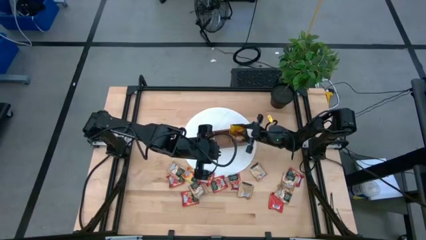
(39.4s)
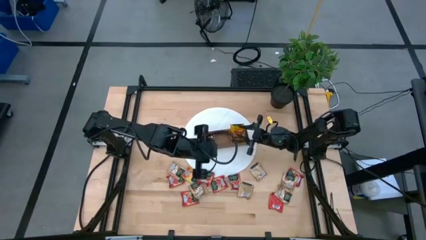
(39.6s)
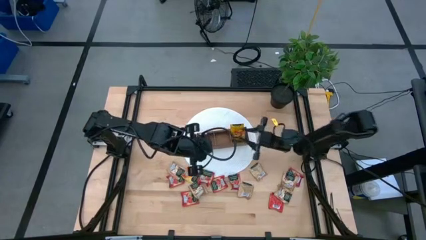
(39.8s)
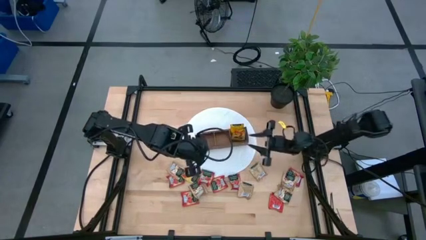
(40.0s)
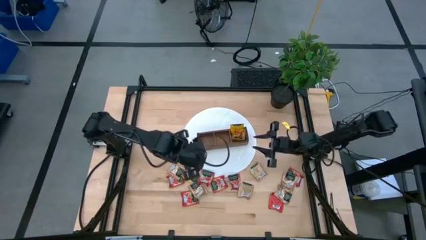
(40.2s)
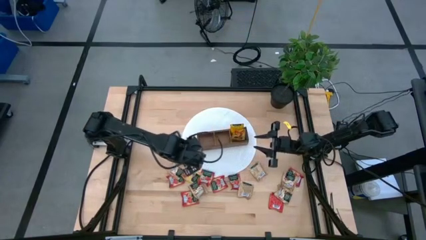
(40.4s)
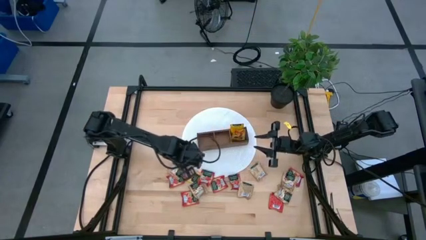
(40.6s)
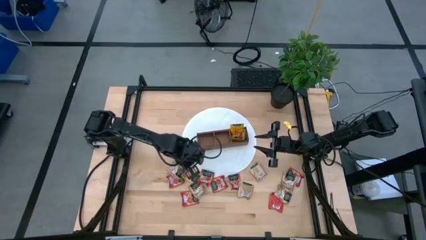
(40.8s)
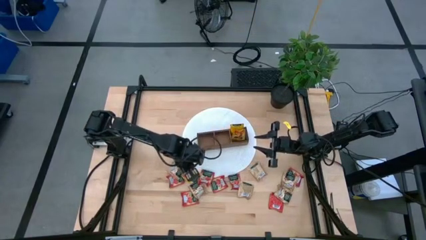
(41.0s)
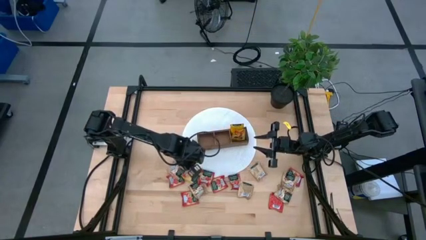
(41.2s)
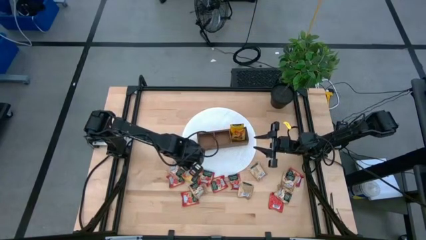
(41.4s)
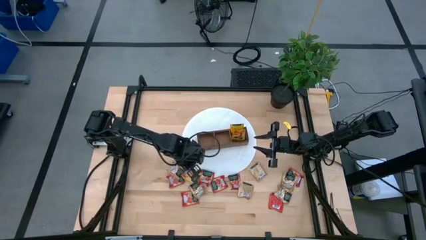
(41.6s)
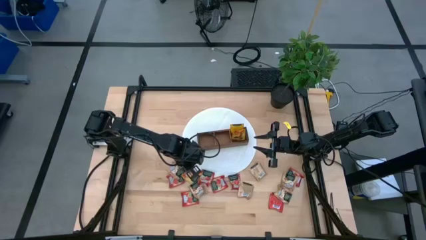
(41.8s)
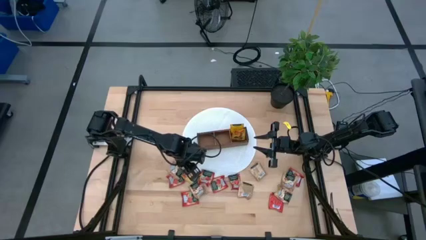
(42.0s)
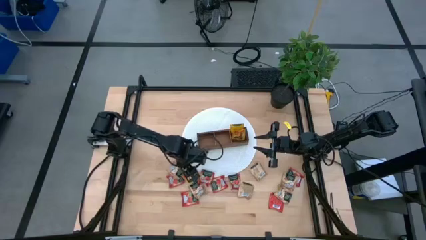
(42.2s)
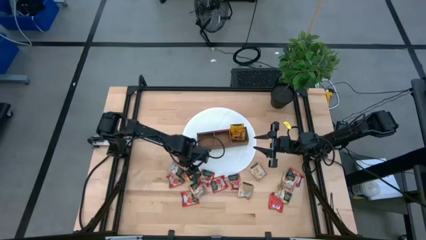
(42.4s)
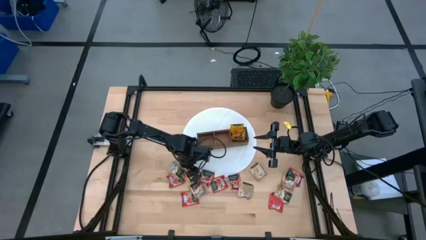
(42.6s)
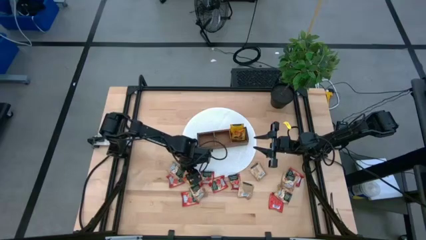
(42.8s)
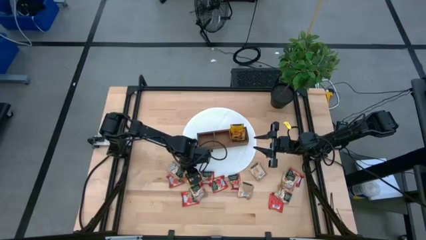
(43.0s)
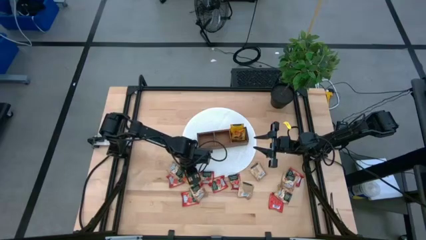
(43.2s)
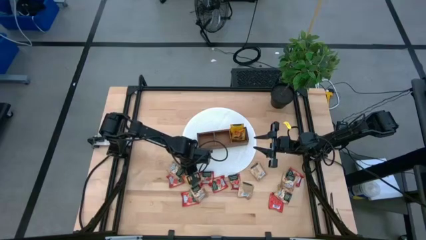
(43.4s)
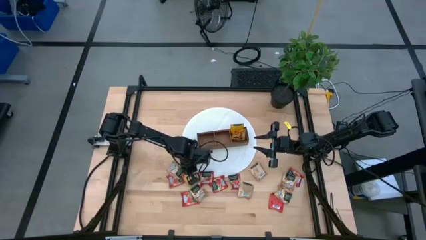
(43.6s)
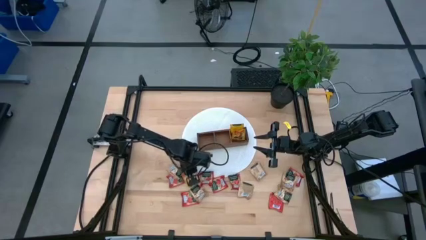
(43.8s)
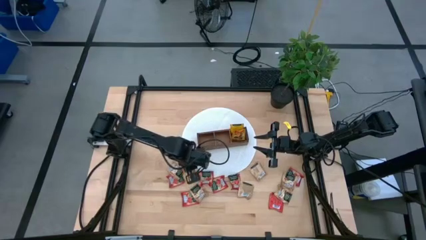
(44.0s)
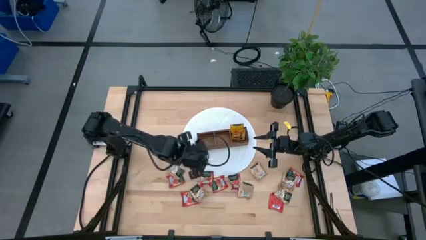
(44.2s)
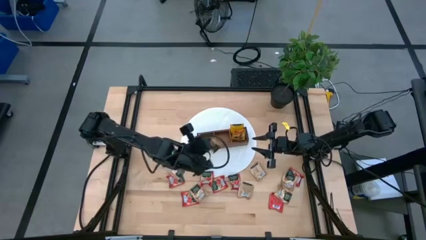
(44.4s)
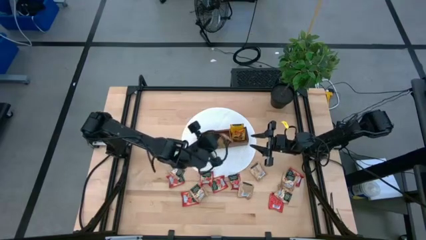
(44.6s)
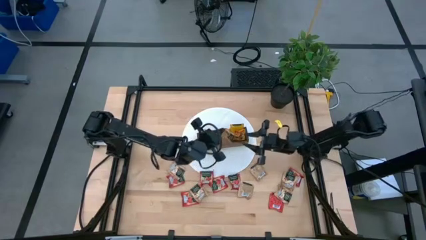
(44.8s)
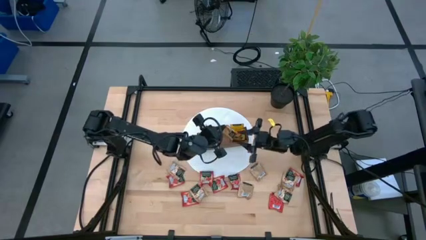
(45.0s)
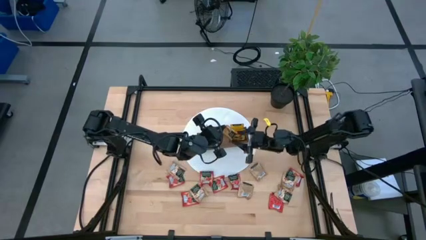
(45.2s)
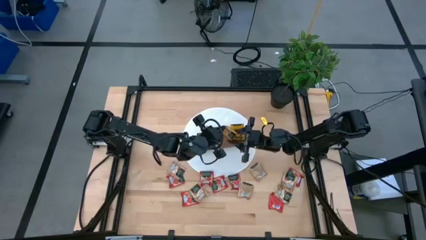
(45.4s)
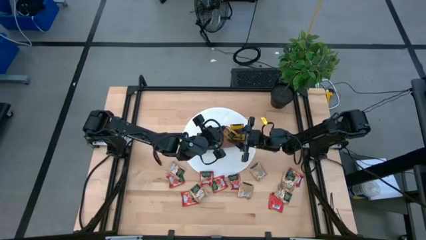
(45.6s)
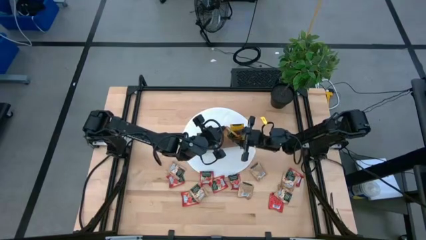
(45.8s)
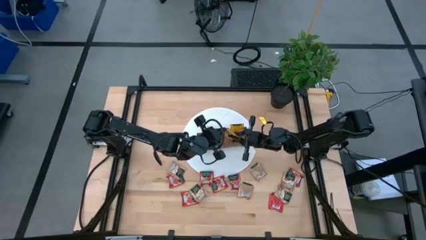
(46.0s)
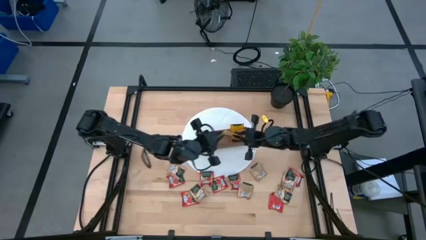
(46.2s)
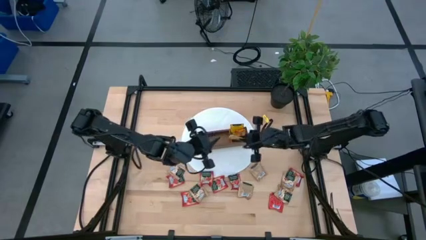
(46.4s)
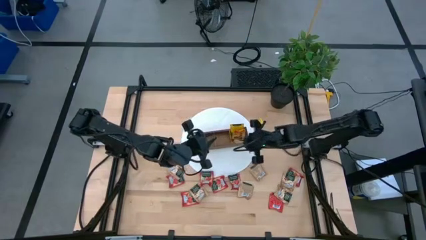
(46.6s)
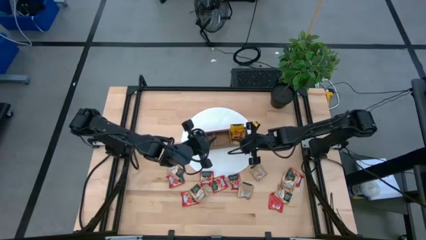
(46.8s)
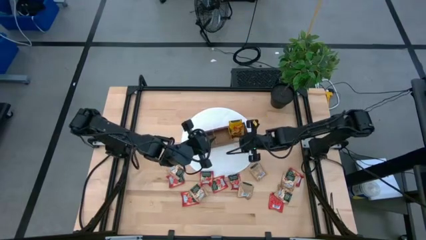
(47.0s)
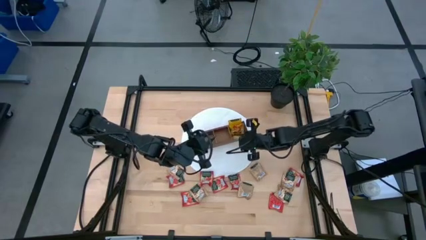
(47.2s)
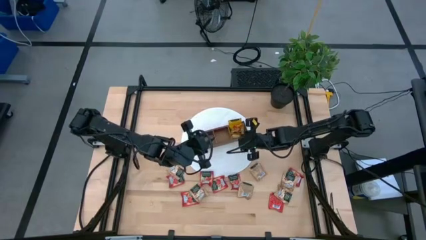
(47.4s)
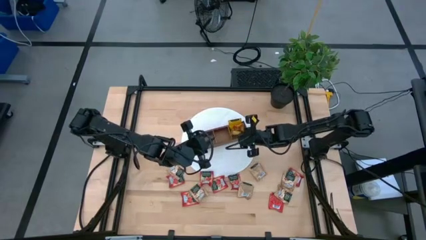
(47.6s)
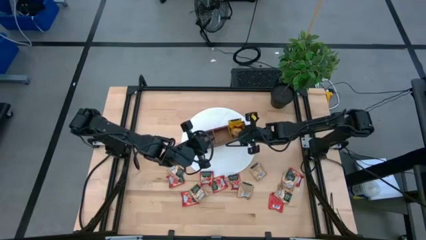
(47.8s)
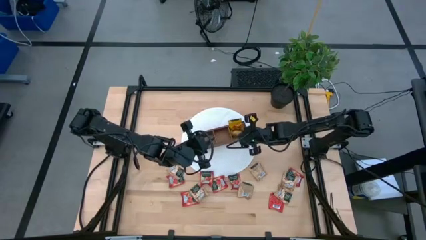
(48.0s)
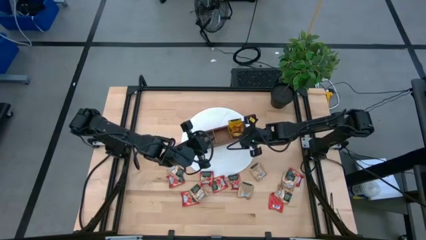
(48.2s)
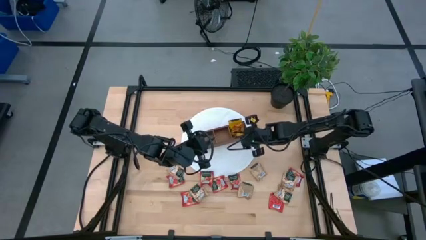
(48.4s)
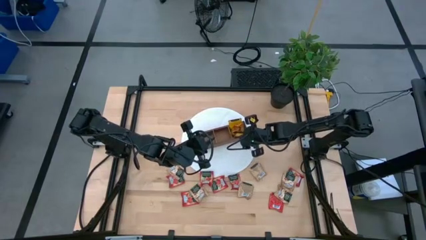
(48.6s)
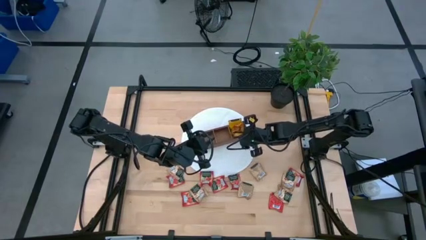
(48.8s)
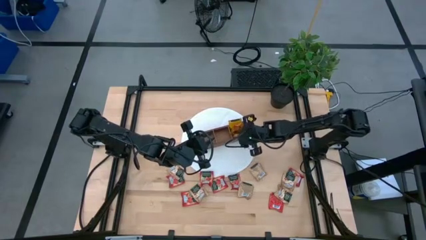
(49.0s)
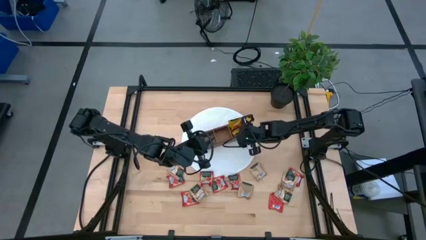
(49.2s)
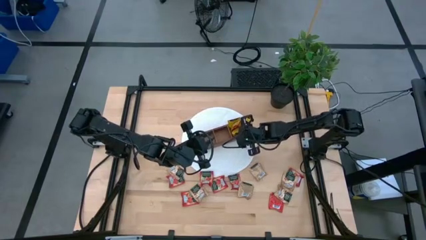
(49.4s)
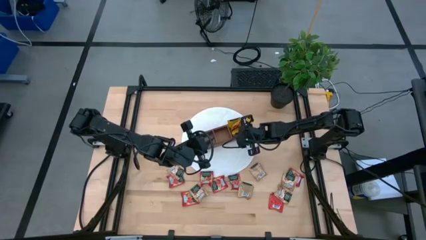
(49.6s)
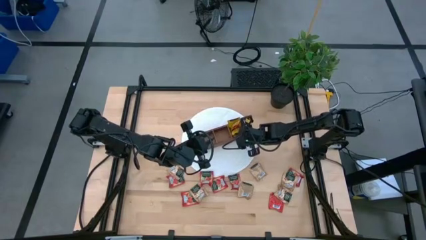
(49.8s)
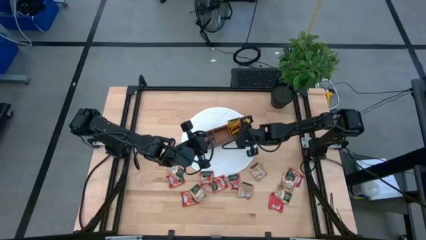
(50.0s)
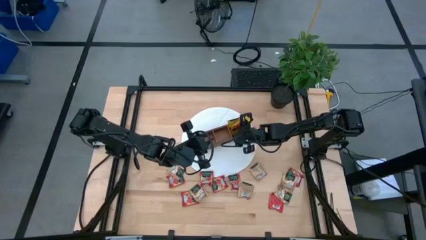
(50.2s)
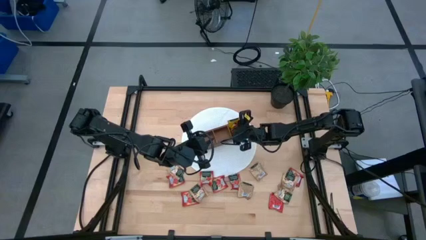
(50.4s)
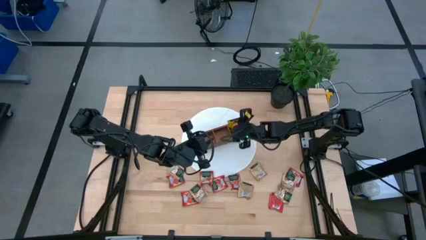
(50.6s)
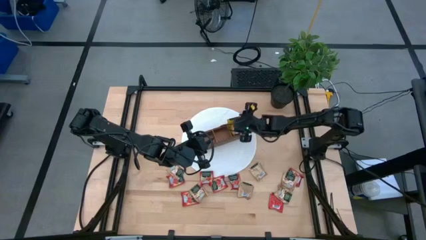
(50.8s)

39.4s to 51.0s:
Task: Pick & Place Tea
Put the yellow tea bag into the right section of the wooden organizer

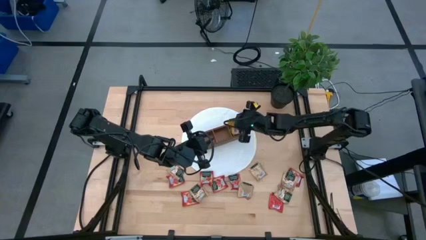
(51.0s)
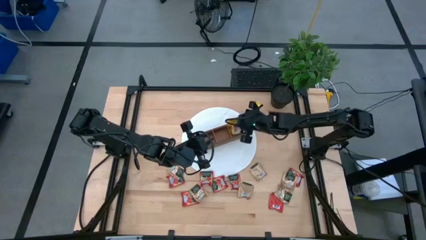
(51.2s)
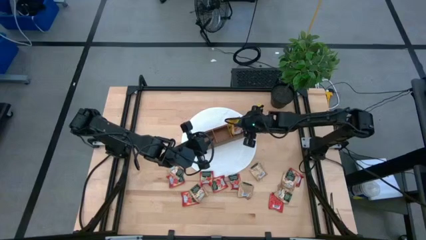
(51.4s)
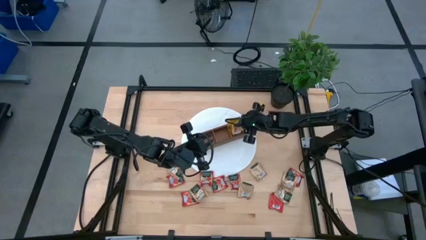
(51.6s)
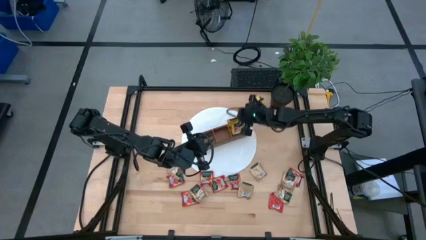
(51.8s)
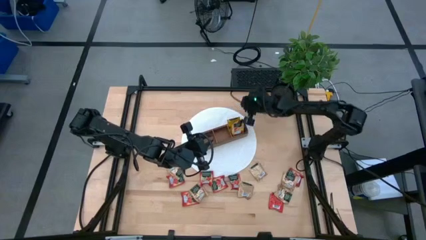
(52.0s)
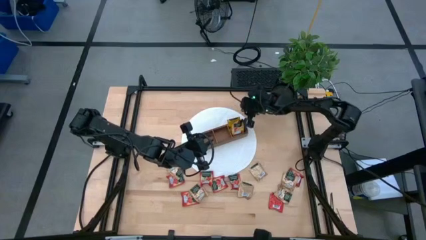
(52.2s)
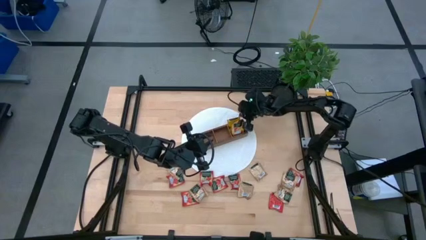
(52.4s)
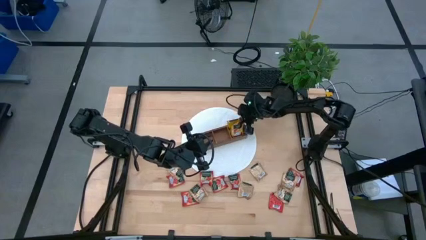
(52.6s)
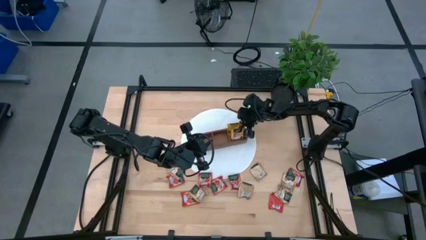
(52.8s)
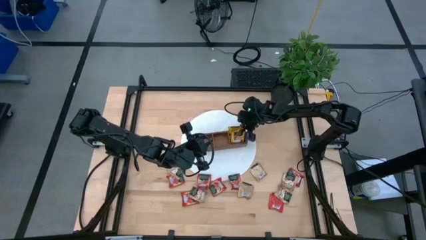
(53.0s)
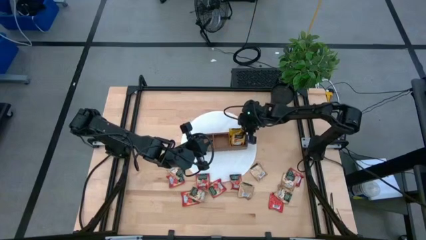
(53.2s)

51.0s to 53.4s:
Adjust the wooden organizer

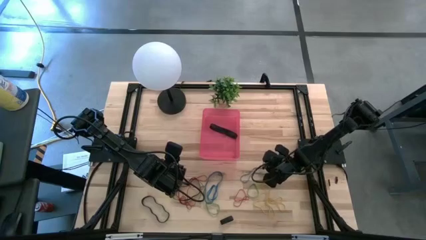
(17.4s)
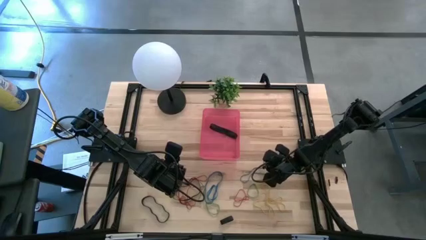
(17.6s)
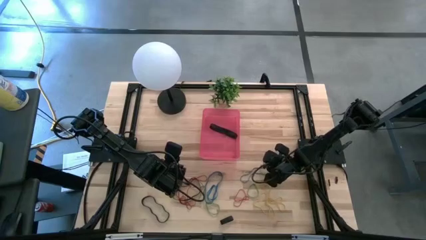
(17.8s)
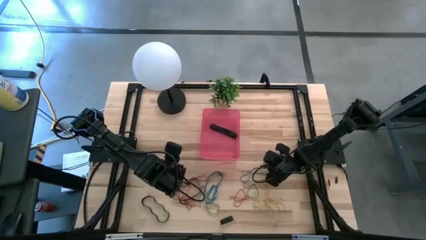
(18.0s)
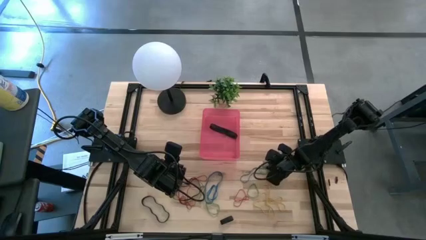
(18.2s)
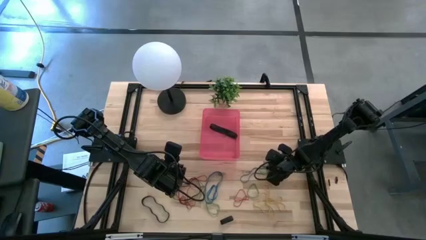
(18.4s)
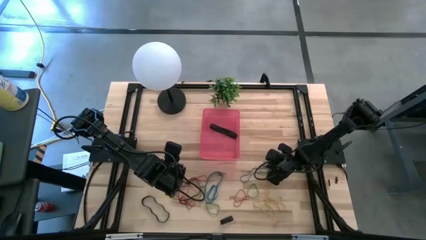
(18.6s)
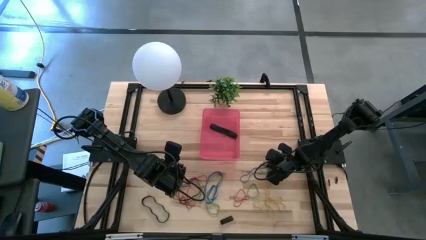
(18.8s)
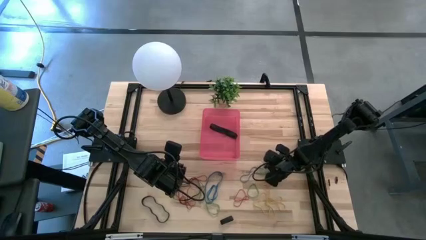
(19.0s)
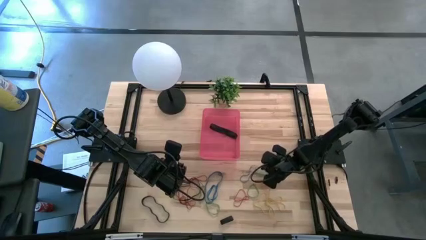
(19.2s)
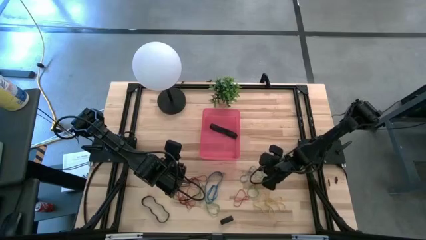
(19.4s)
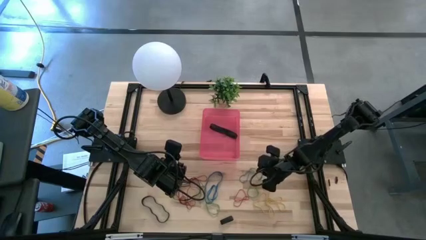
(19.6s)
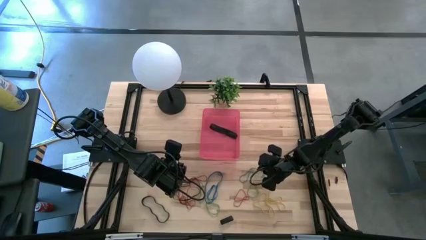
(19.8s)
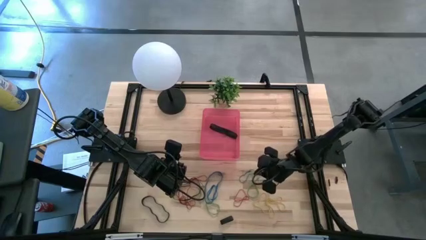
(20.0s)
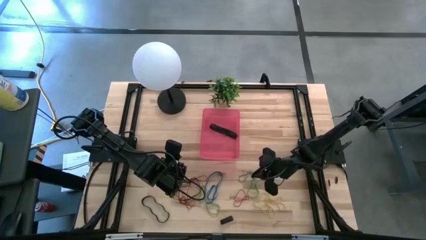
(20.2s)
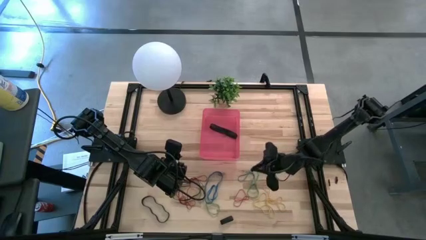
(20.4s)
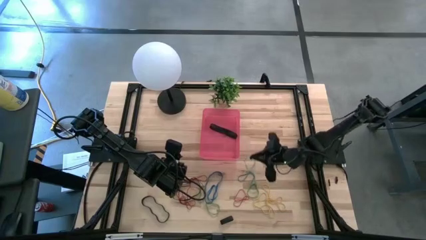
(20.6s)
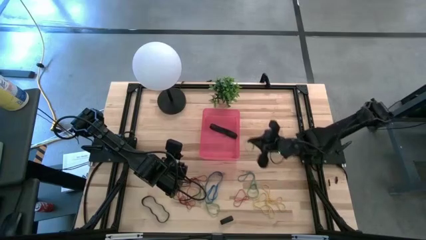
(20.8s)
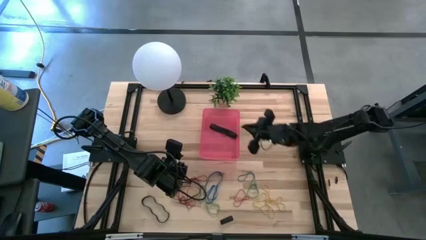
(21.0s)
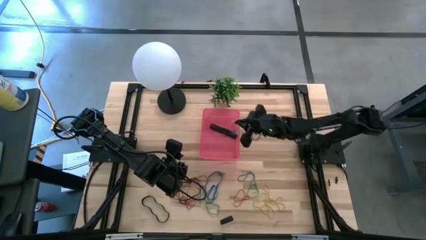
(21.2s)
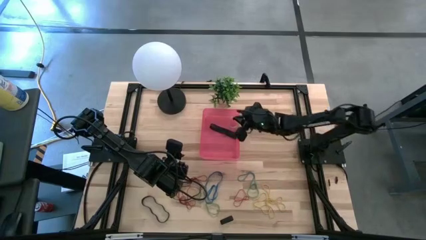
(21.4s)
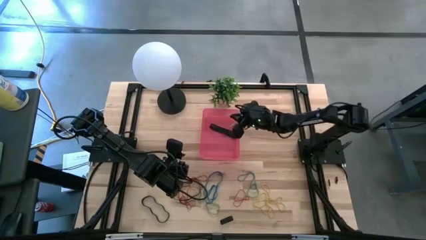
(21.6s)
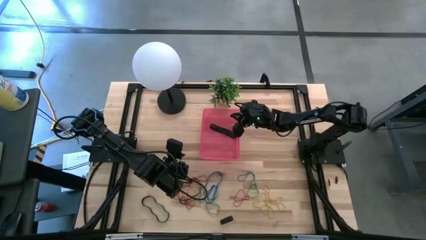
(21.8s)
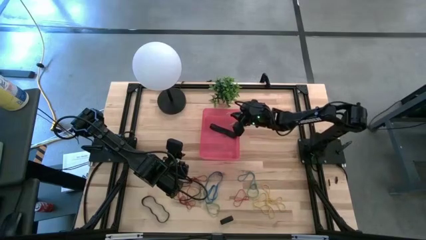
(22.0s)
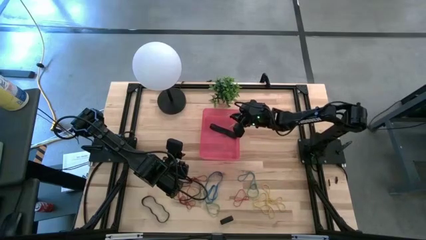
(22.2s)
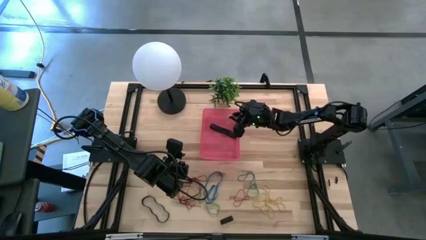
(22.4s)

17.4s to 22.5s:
Task: Pick and place rubber bands into bin
Put the green rubber band into the red bin
